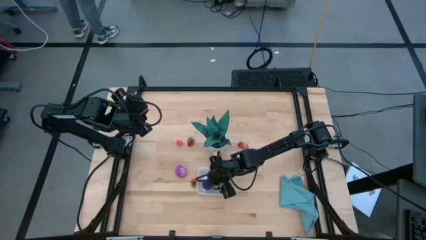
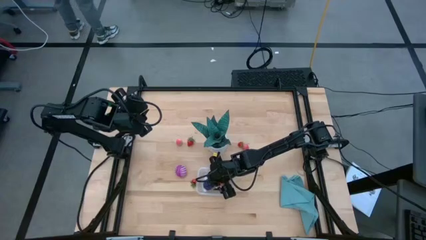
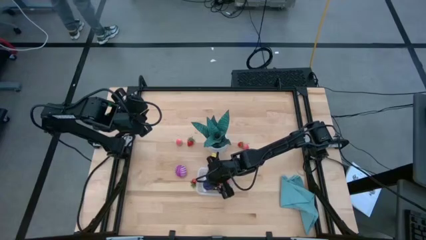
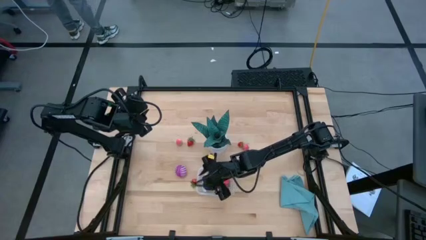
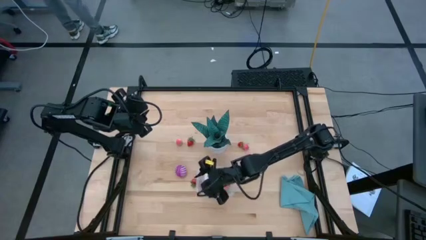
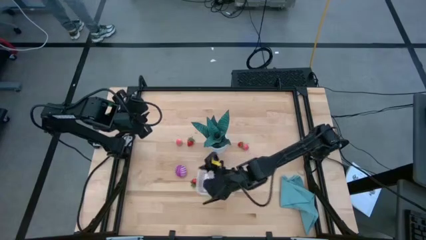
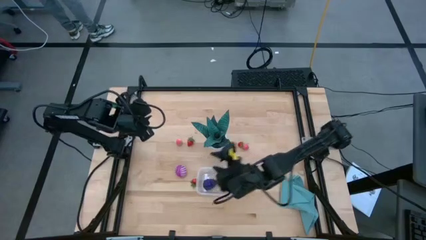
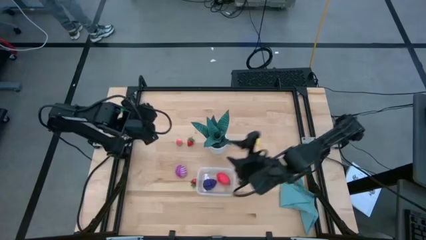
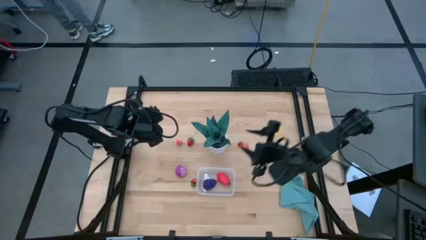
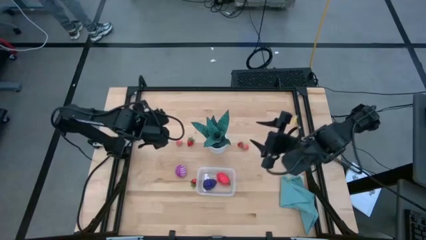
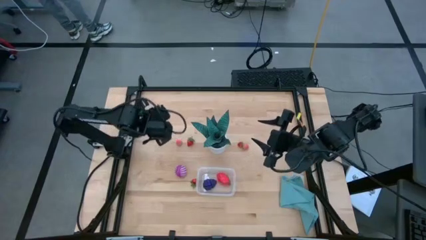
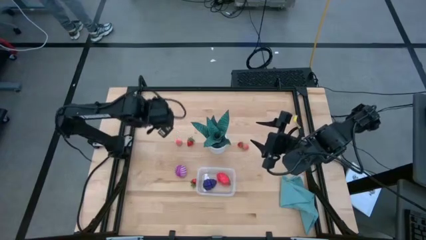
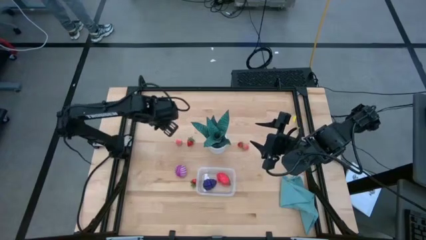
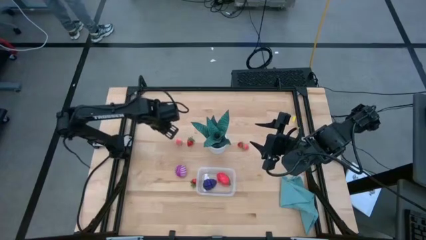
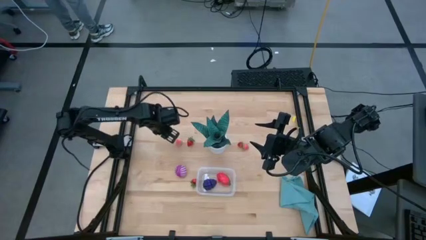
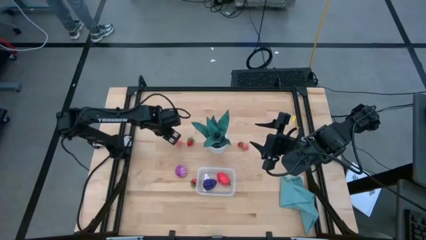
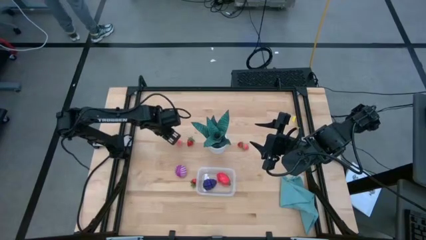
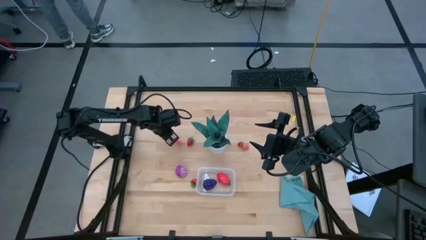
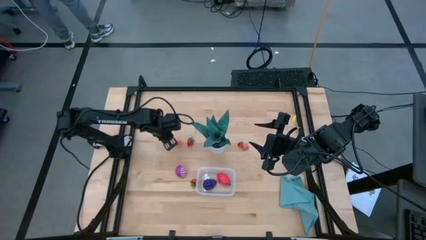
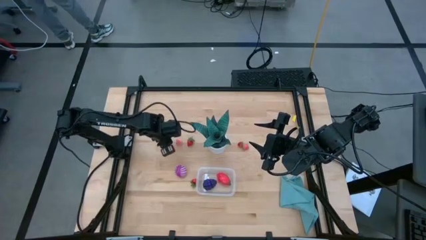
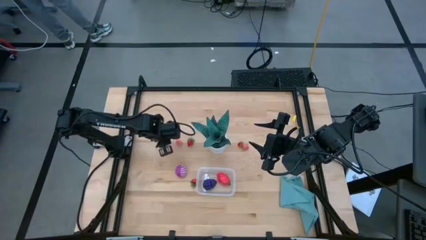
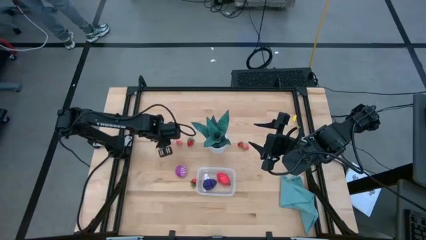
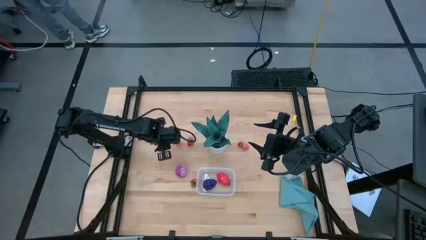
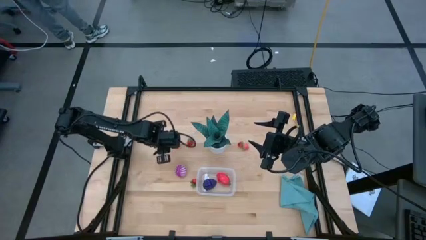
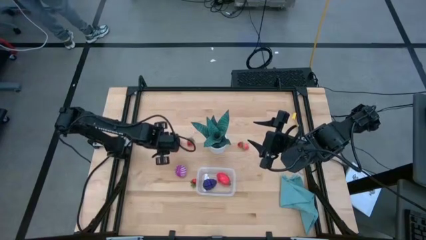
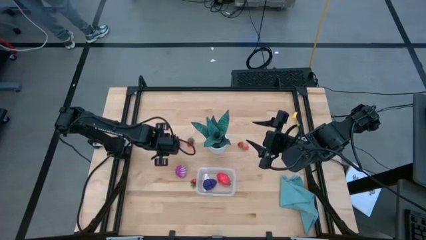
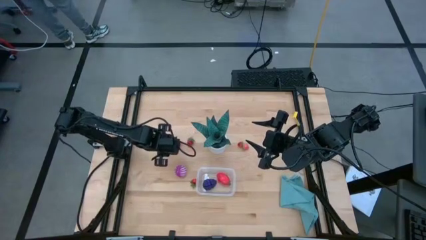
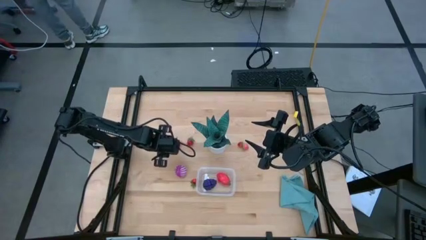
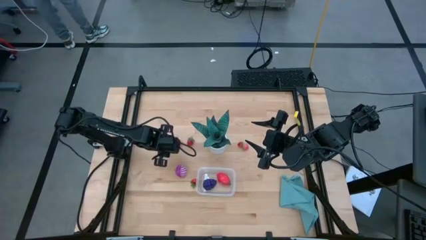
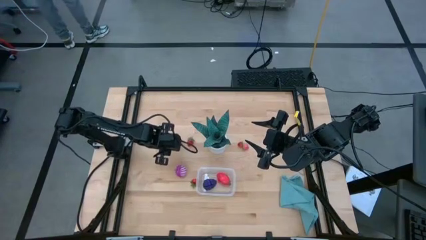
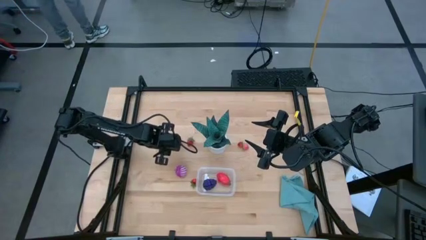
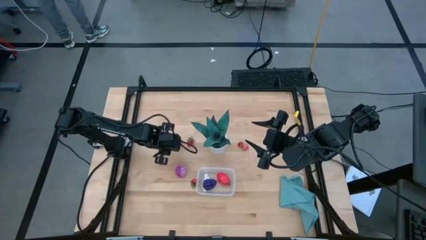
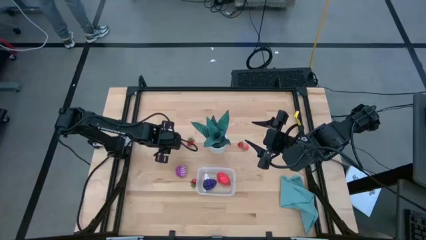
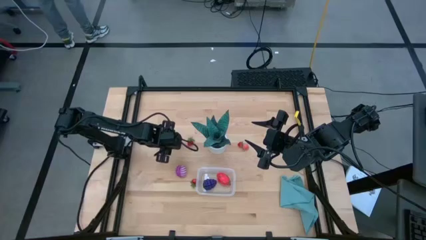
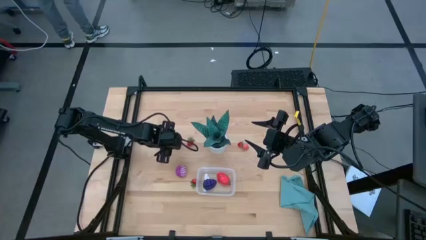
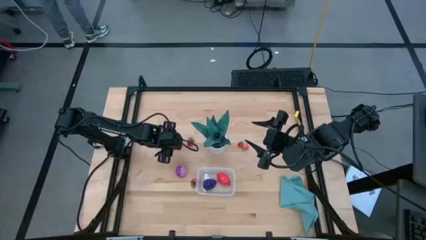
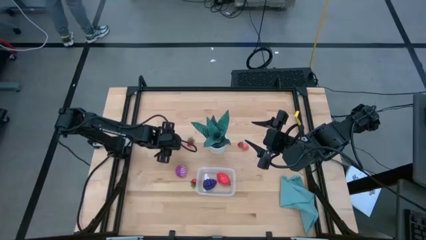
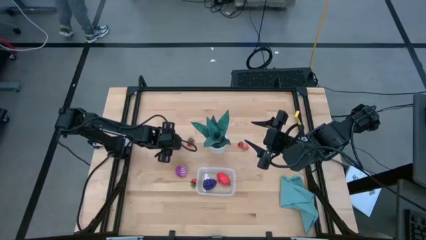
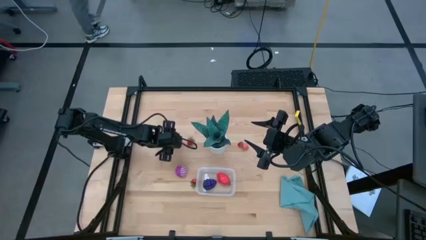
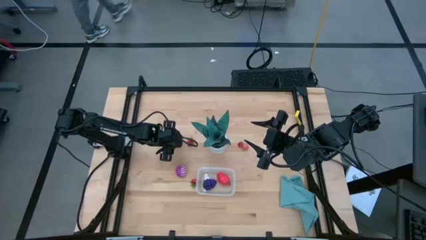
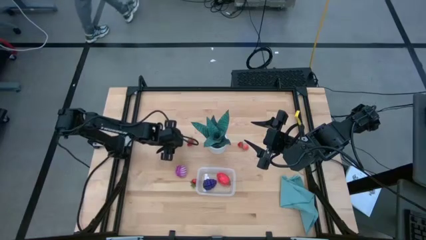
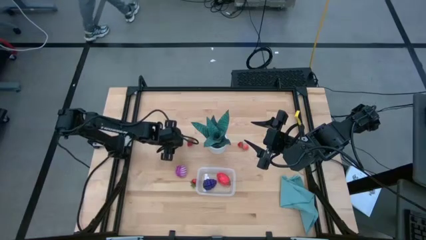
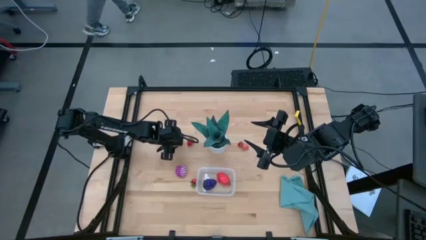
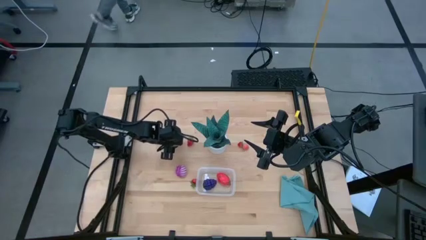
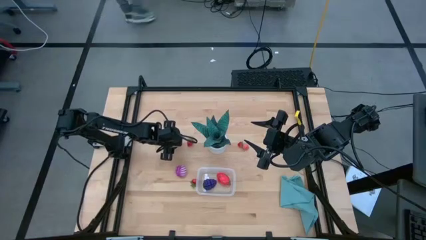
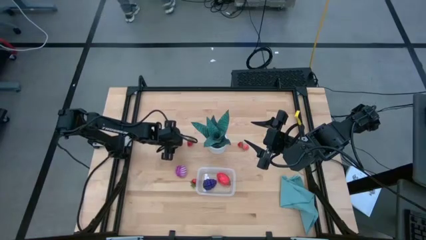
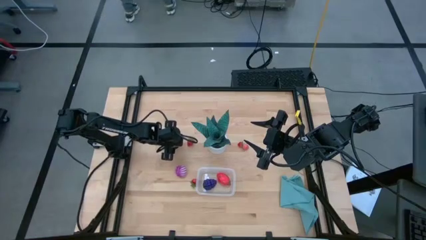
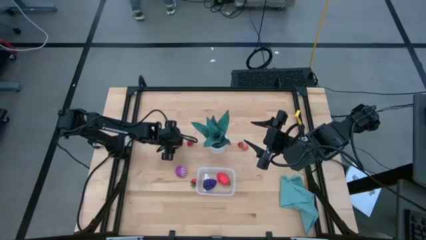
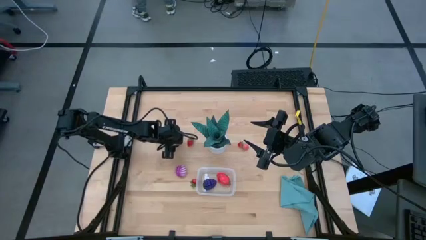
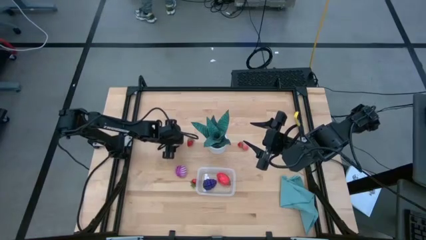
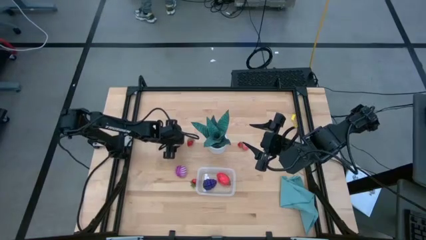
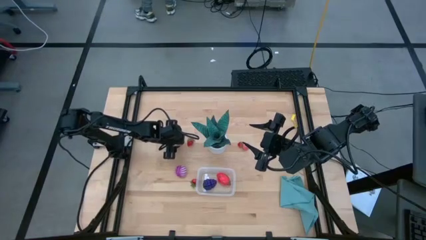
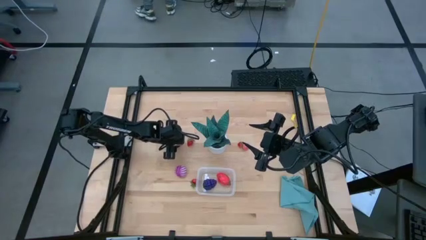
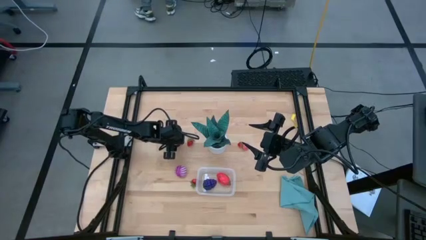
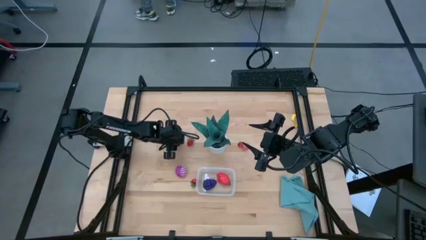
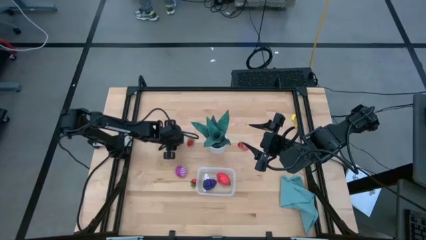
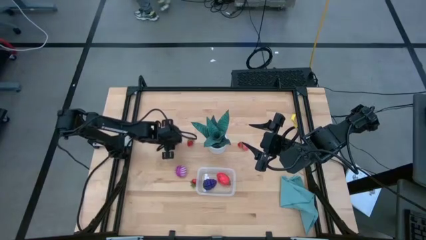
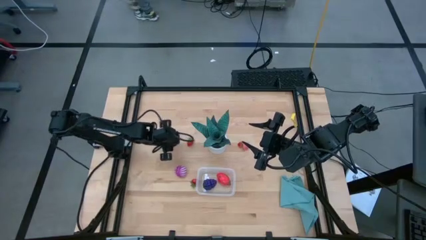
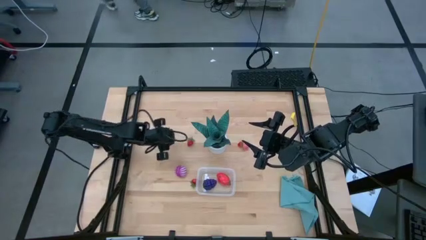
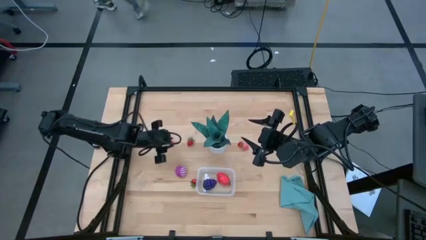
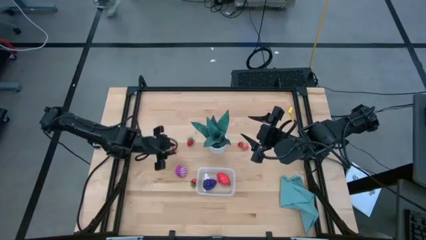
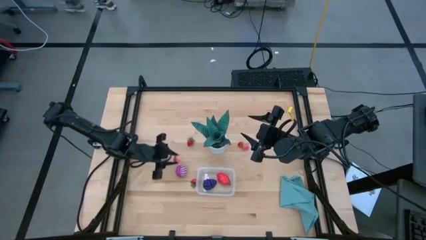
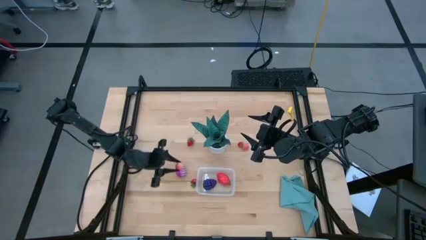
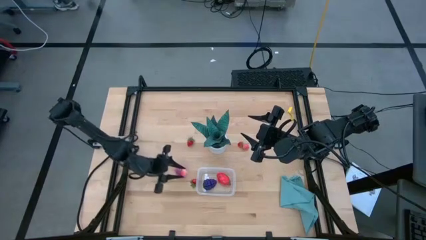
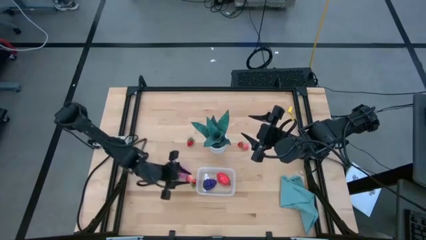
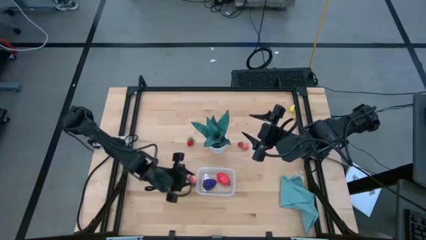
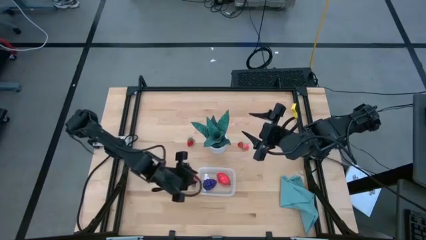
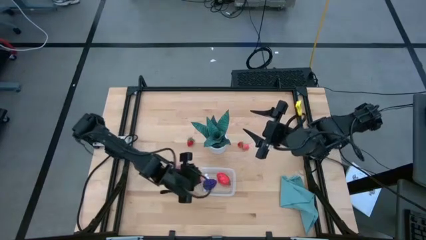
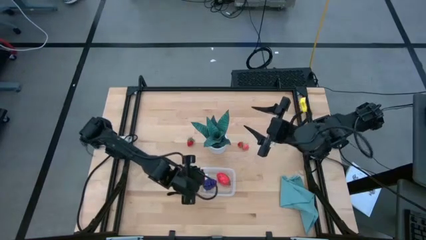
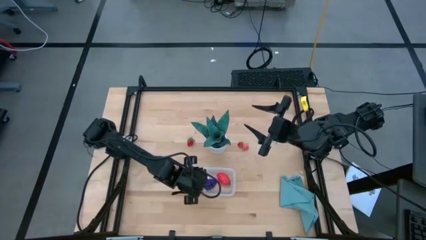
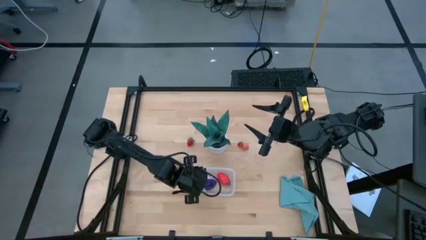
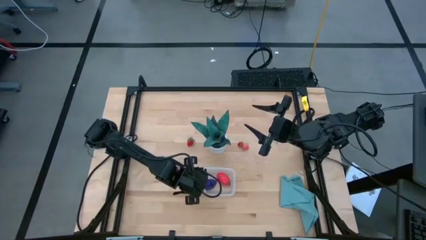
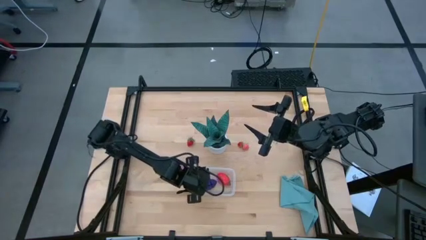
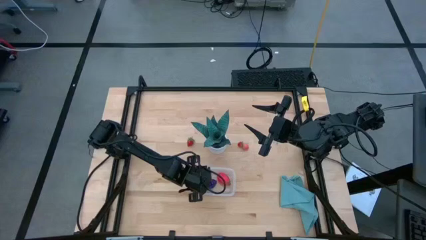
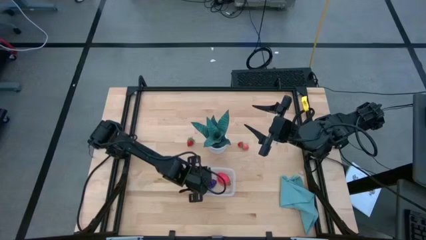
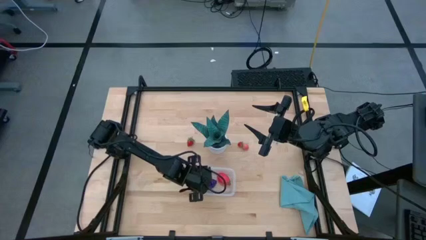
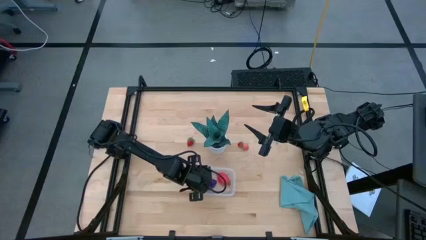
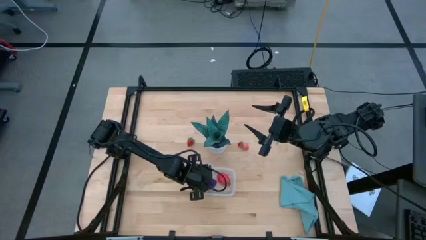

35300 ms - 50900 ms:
Task: Pick and placing Produce into tupperware
Put the left pink peach into the transparent bin
